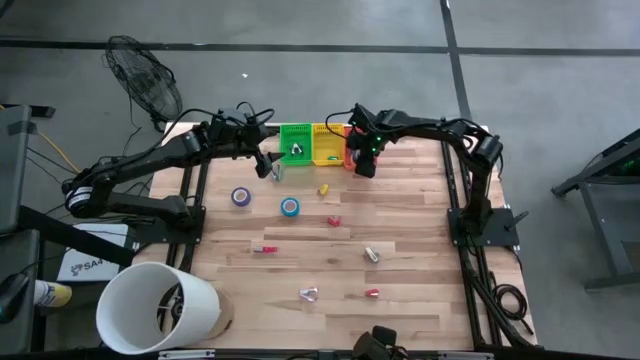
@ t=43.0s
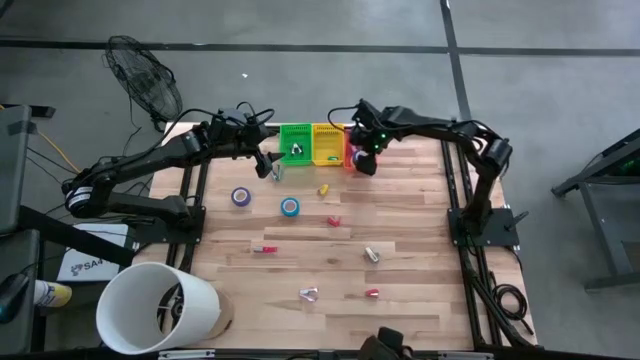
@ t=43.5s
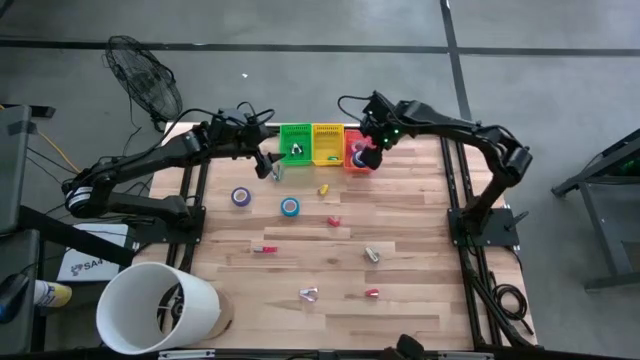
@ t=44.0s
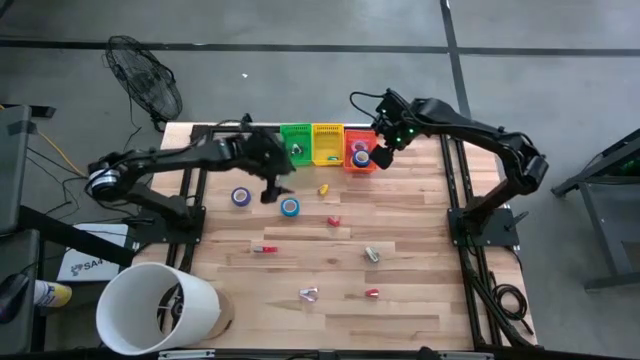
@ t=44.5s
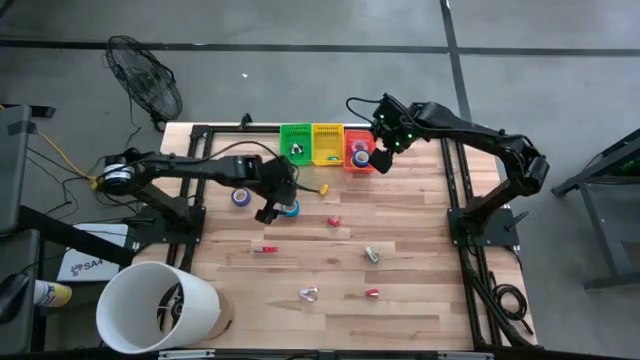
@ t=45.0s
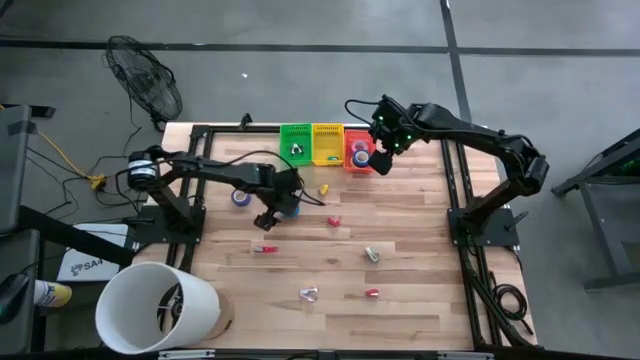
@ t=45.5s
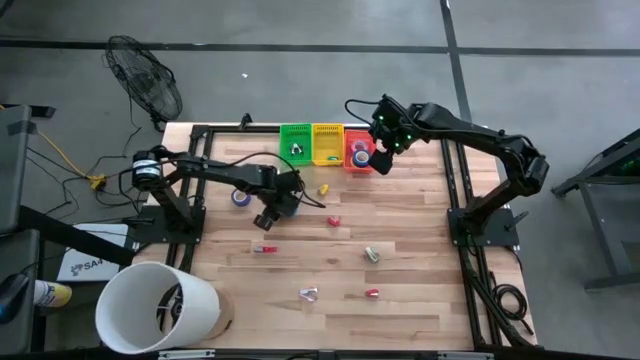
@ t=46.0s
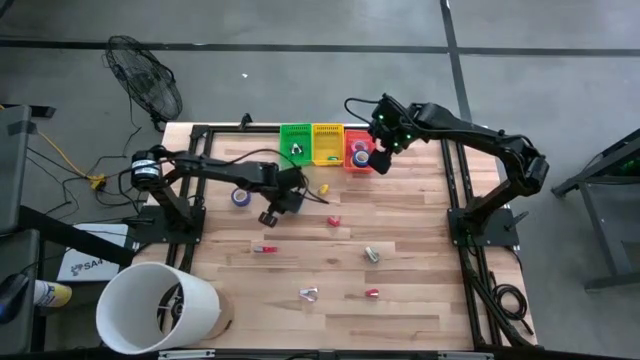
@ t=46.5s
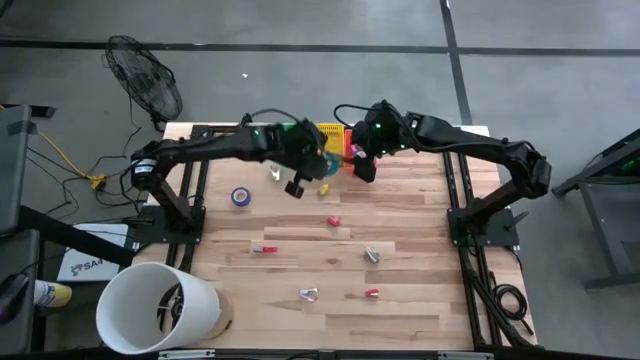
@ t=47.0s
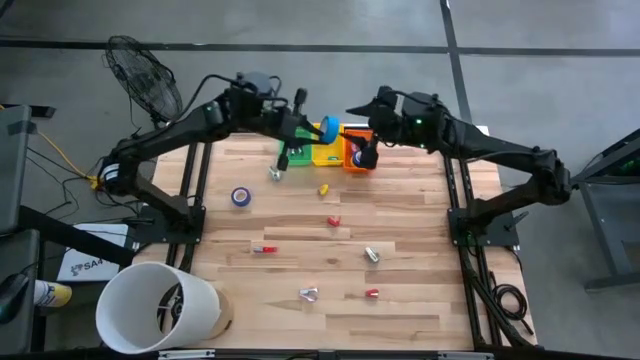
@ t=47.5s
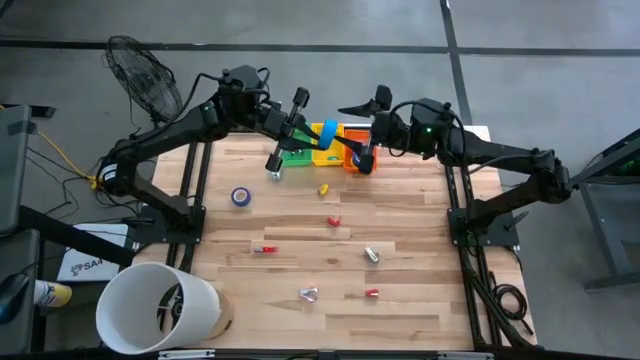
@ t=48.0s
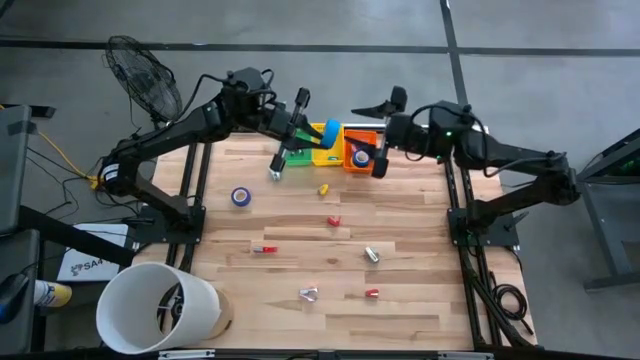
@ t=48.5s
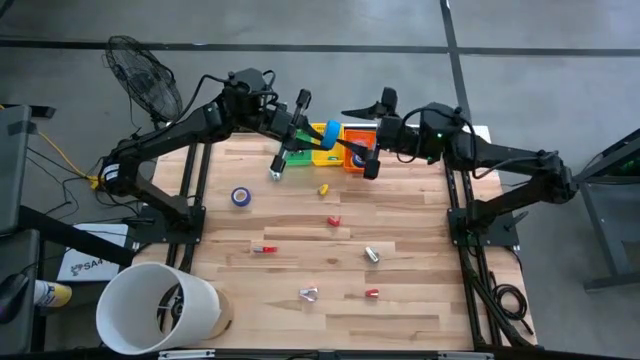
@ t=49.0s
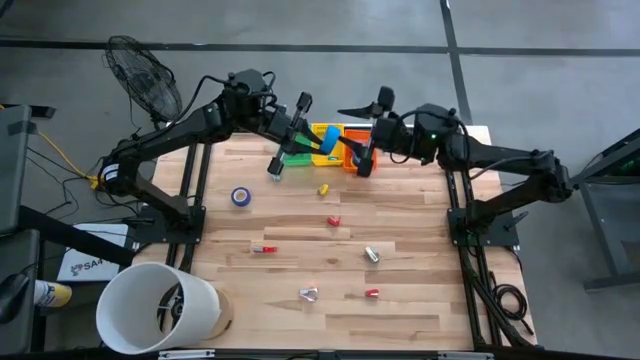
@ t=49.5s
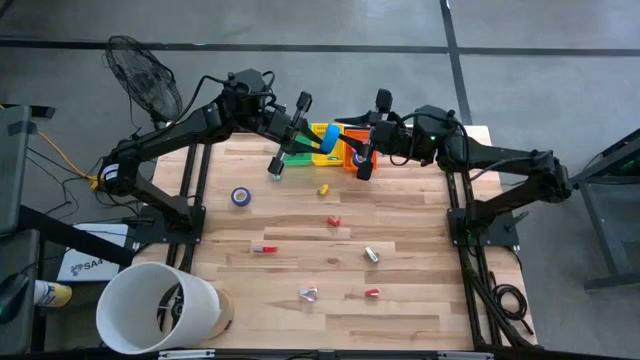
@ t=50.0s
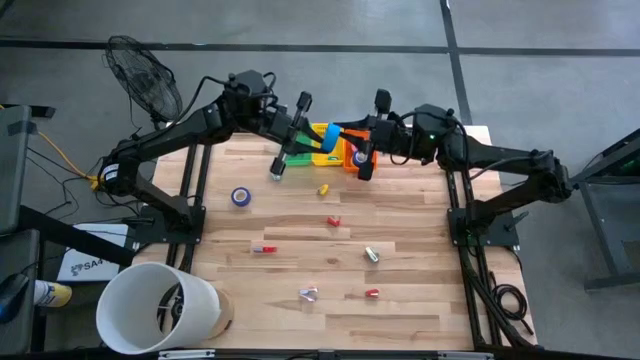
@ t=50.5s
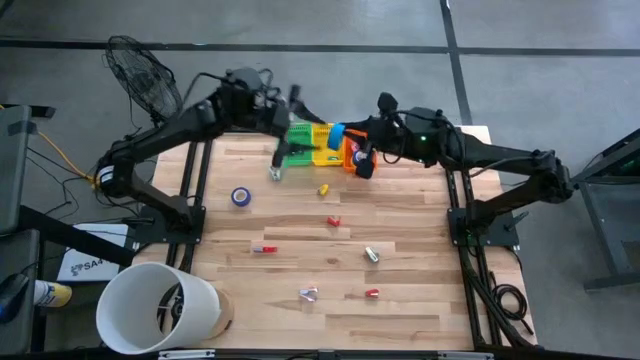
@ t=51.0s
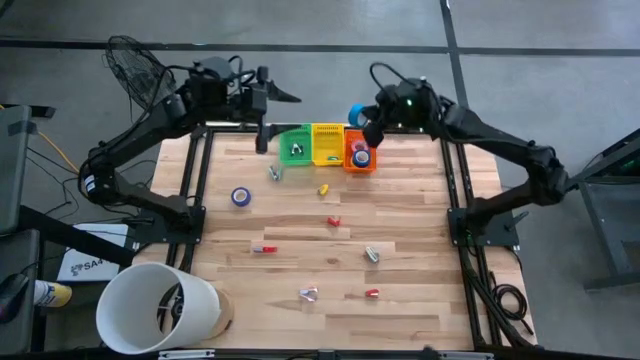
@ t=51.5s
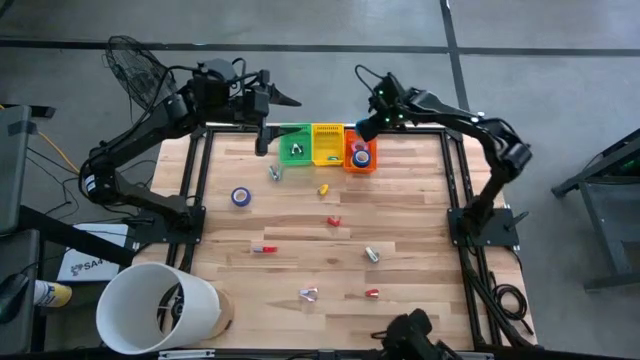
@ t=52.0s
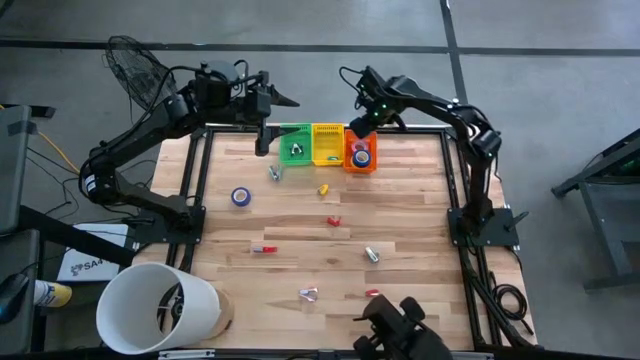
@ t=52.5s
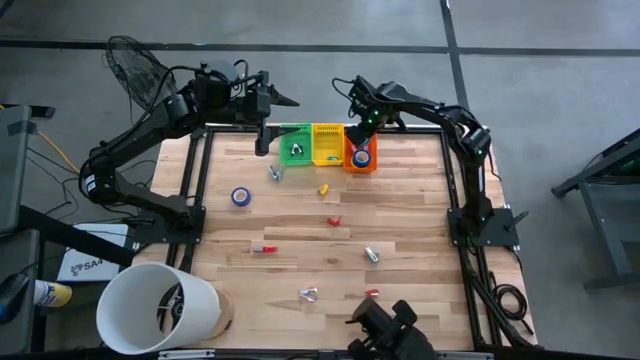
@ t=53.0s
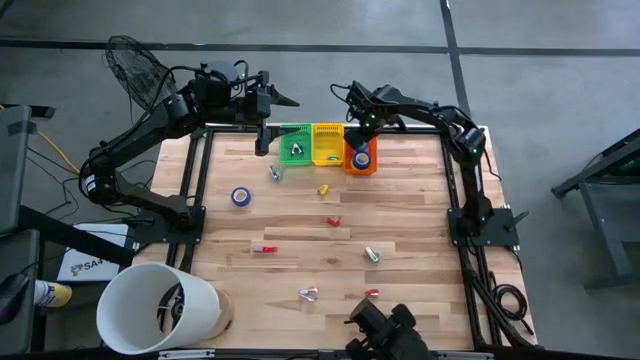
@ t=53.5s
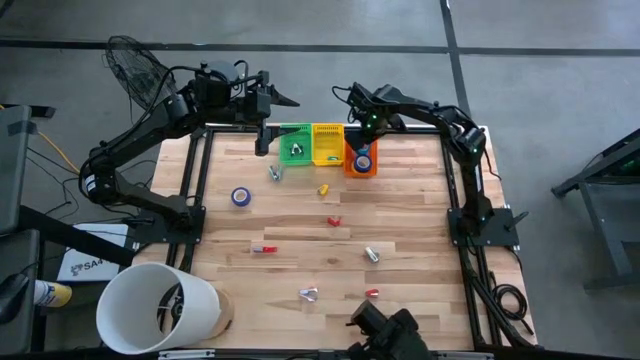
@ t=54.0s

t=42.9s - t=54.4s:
Task: Pick and place Stapler, Stapler remover, tape
Put the light blue tape into the orange bin

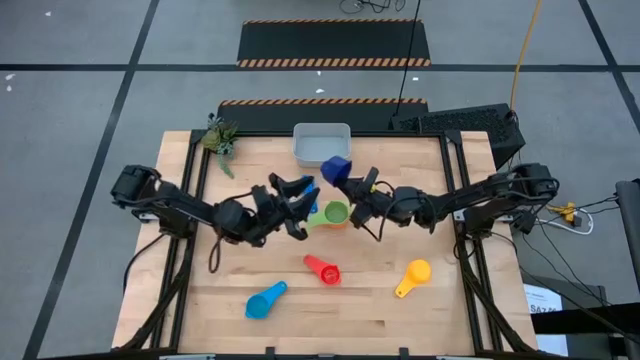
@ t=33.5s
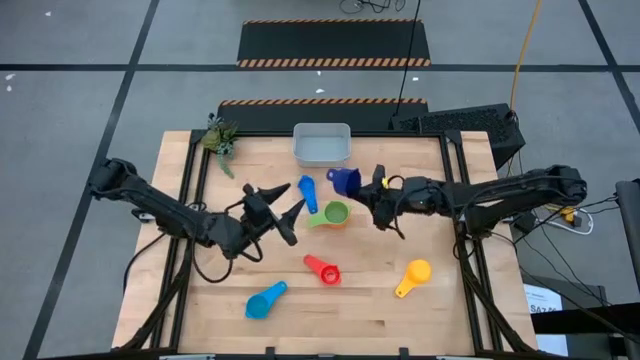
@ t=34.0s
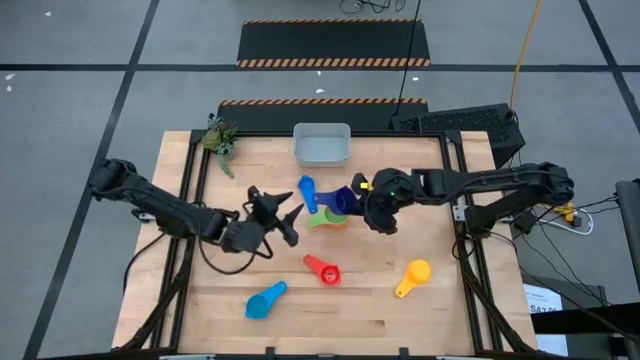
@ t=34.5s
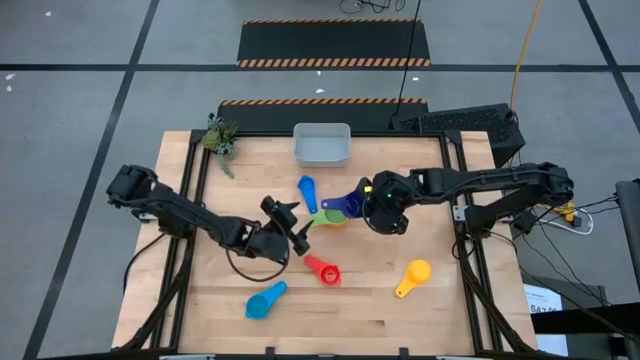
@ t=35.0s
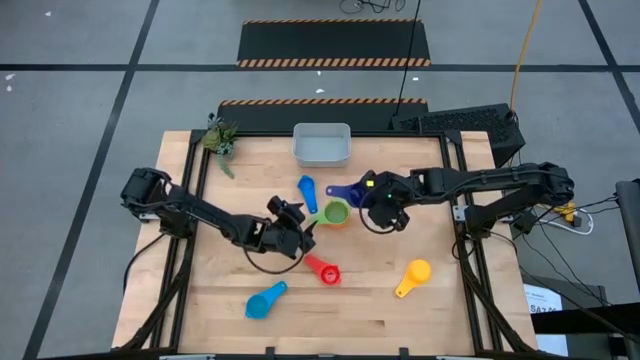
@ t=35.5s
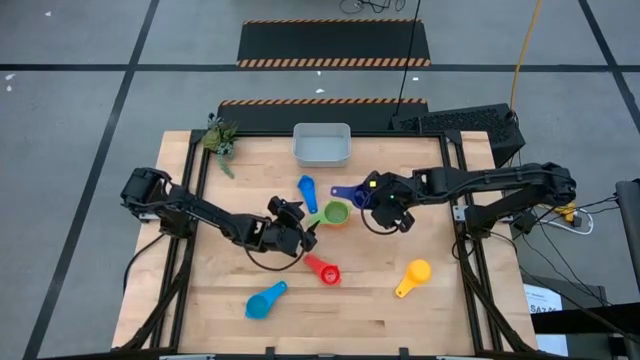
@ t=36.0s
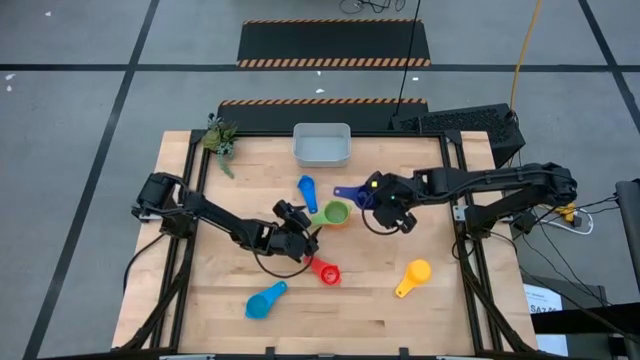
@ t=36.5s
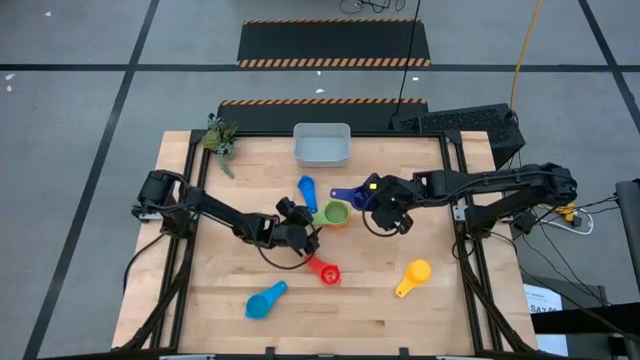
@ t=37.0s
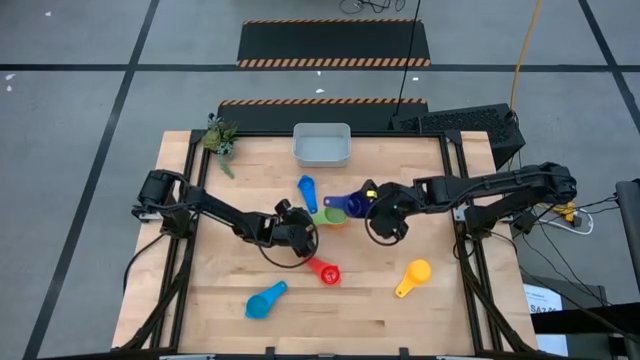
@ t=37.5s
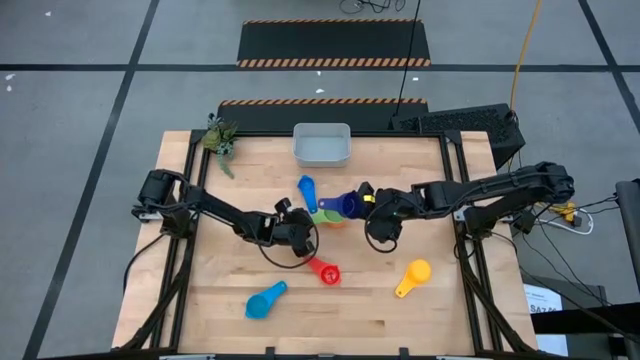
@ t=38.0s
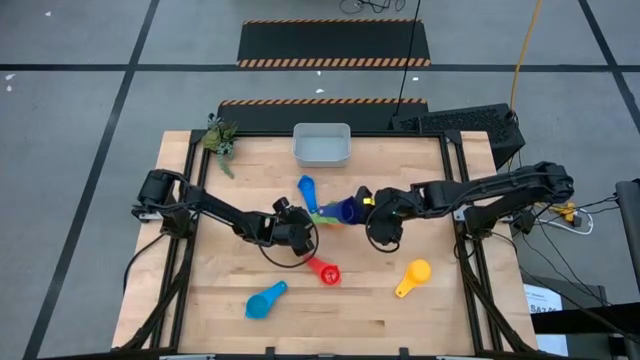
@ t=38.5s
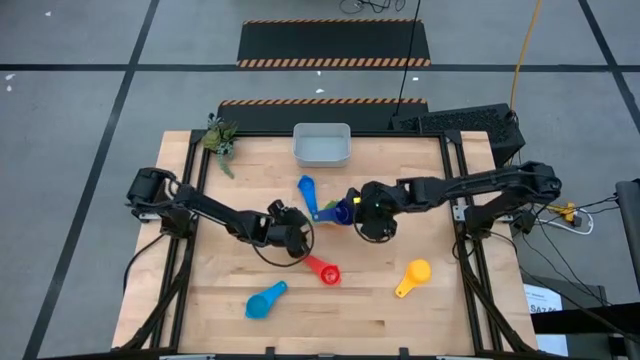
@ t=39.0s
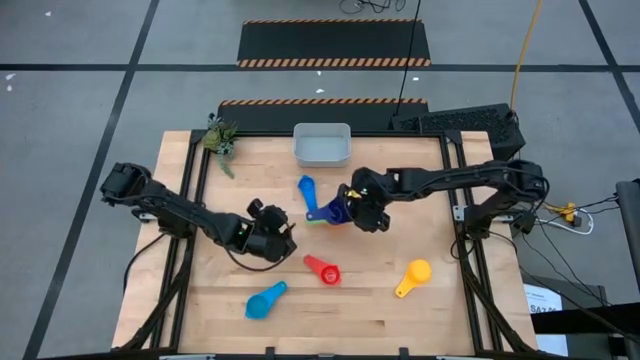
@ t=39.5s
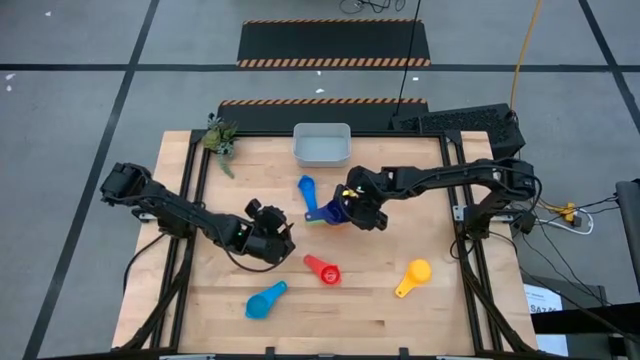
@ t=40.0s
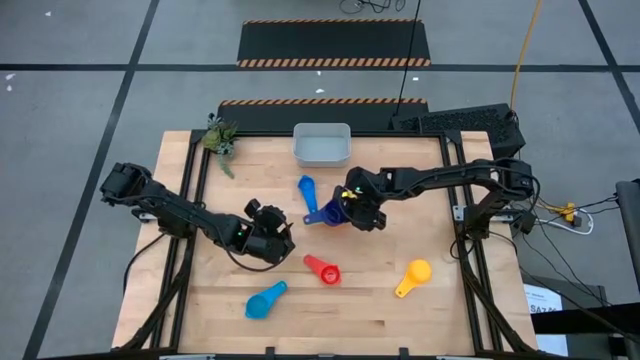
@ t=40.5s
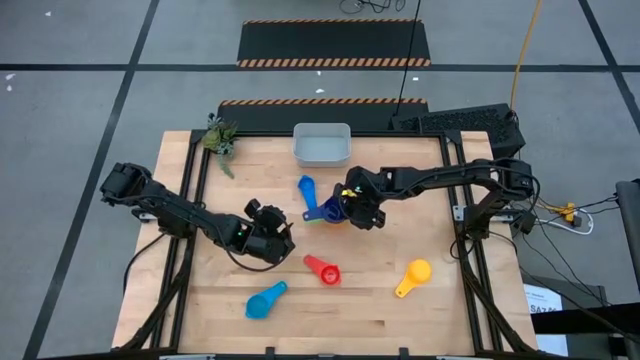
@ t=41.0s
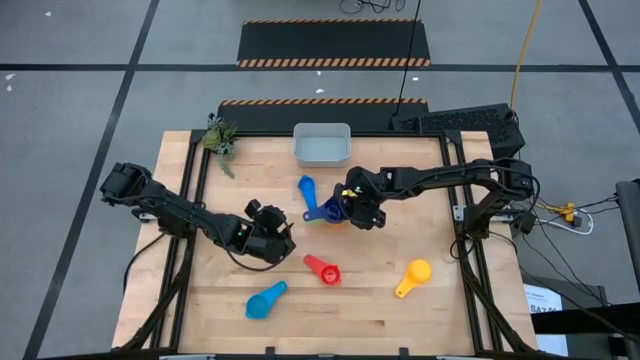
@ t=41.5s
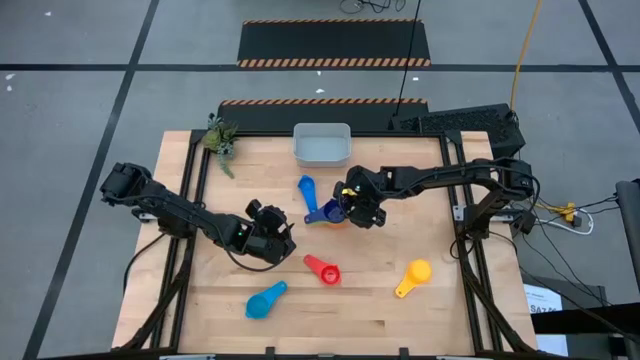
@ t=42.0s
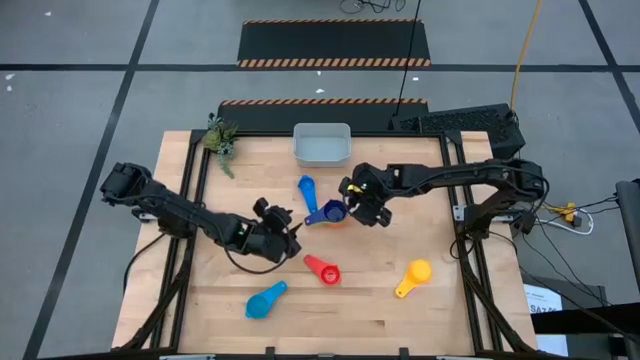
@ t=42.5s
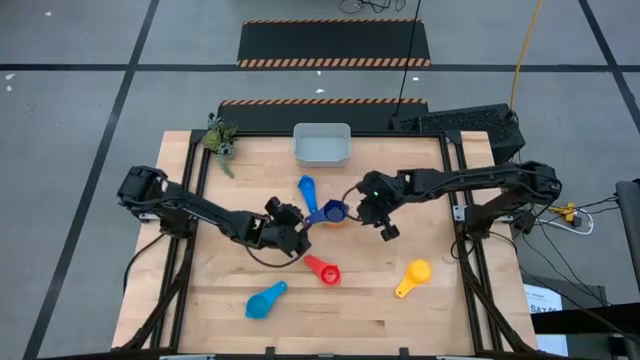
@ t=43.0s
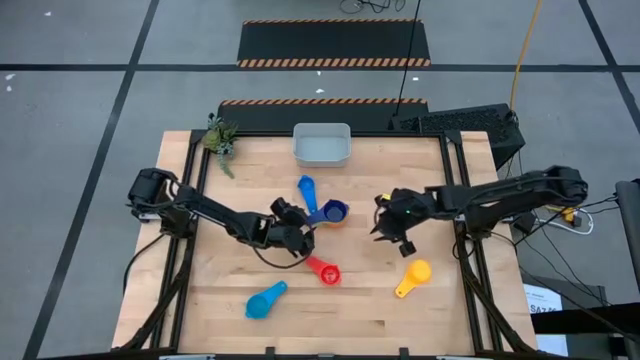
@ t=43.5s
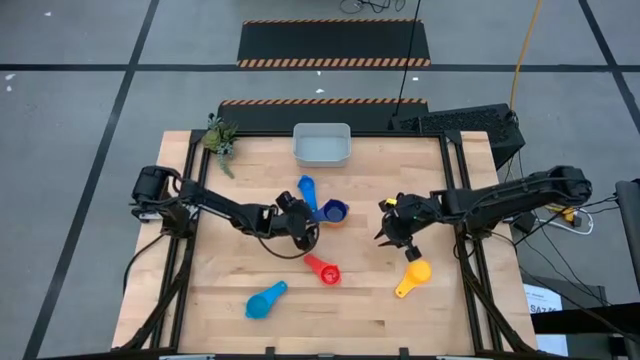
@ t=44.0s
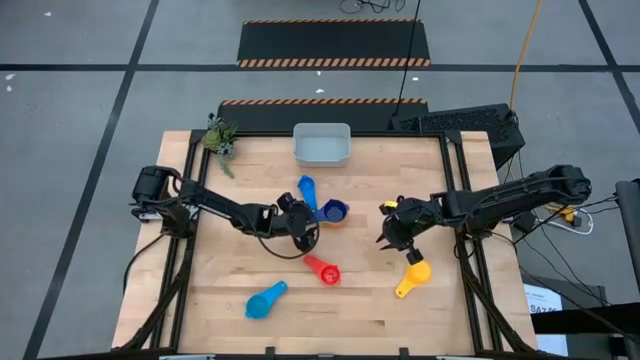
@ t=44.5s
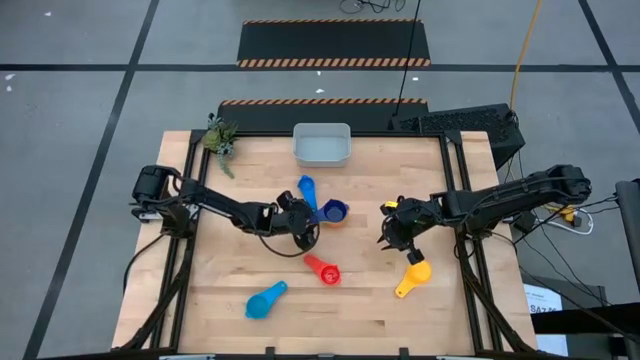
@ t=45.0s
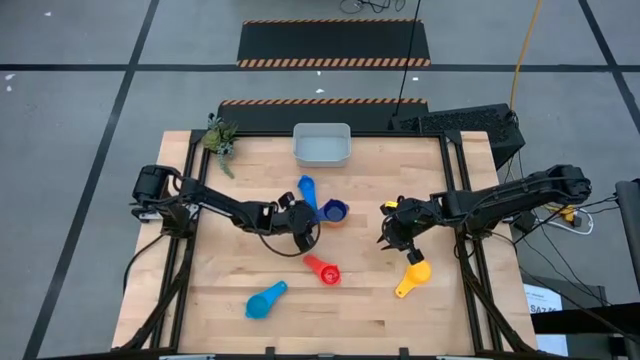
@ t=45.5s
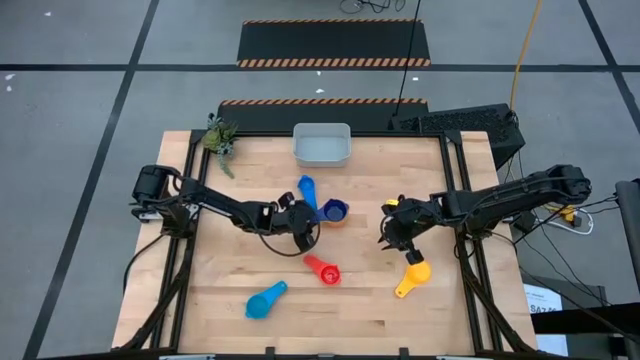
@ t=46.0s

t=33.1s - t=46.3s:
Task: Nest measuring cups in basket
Stack the purple measuring cup into the green measuring cup
